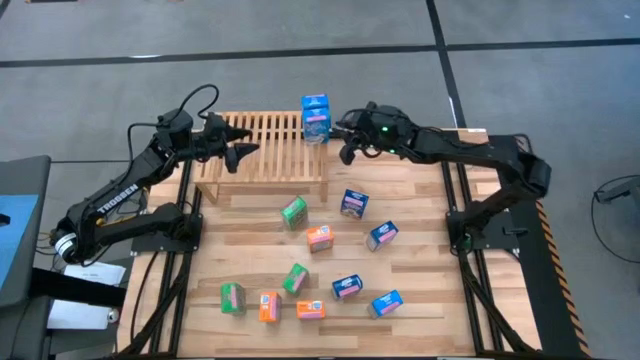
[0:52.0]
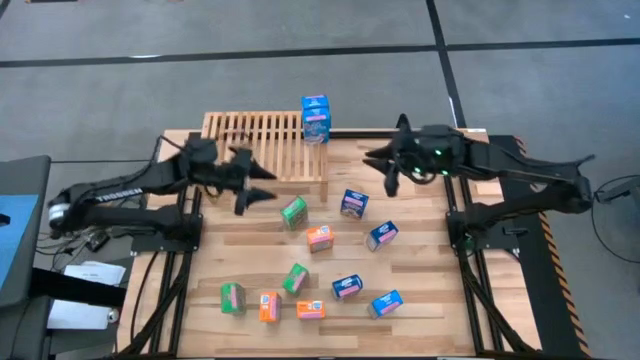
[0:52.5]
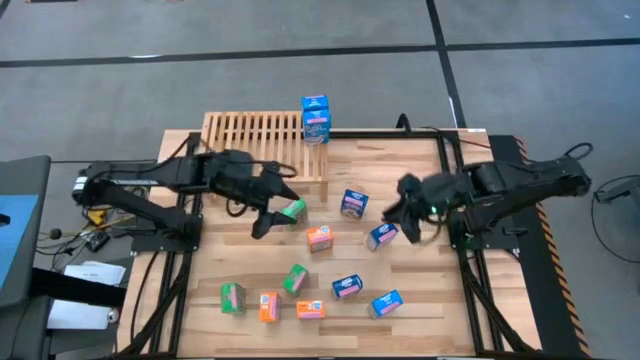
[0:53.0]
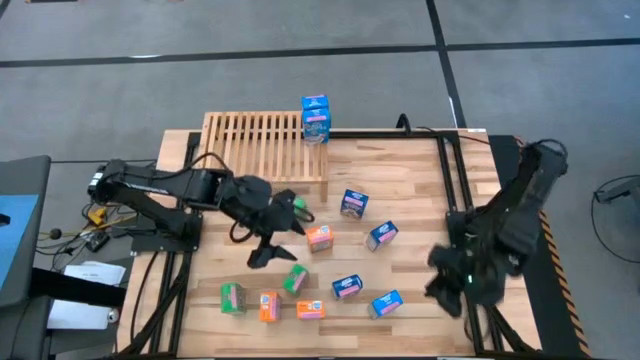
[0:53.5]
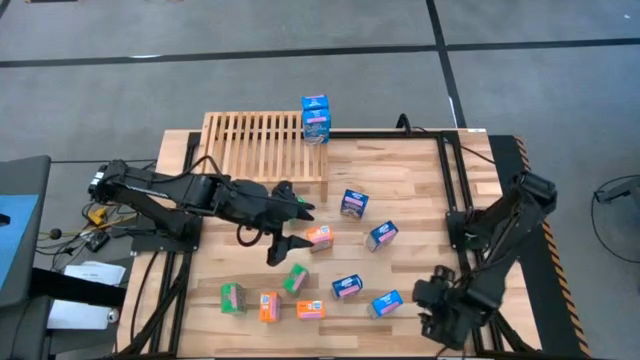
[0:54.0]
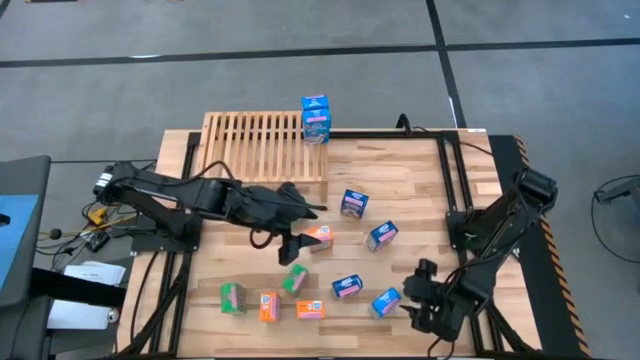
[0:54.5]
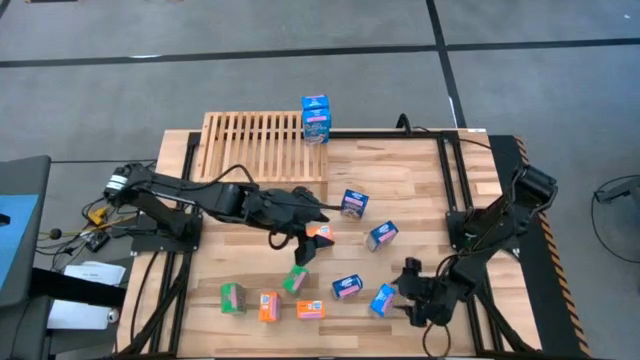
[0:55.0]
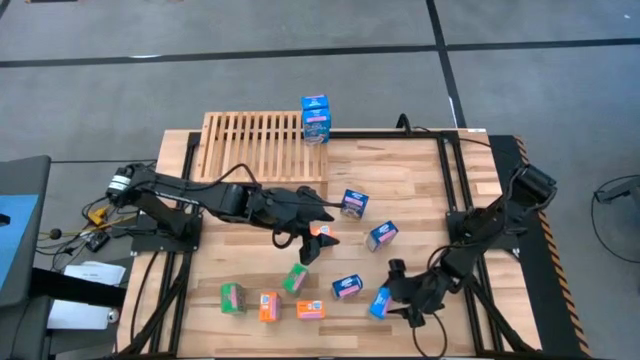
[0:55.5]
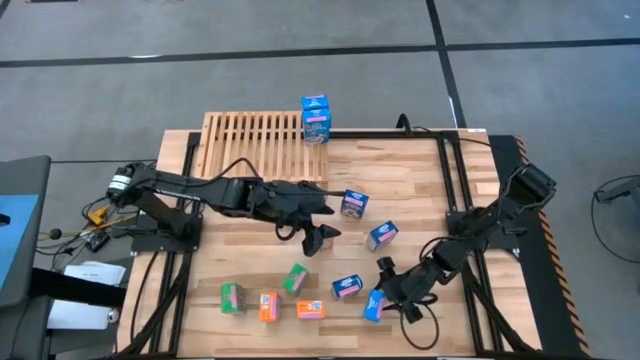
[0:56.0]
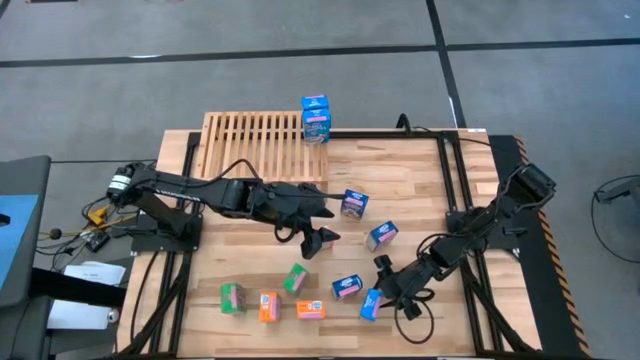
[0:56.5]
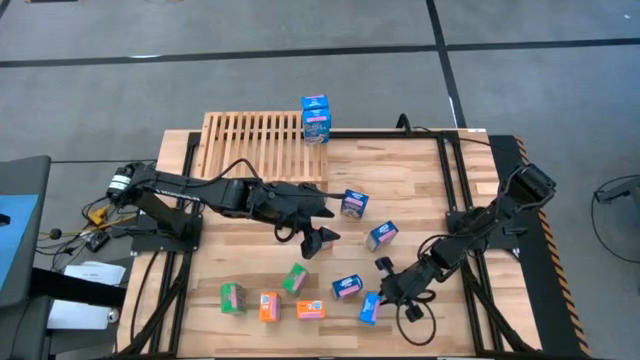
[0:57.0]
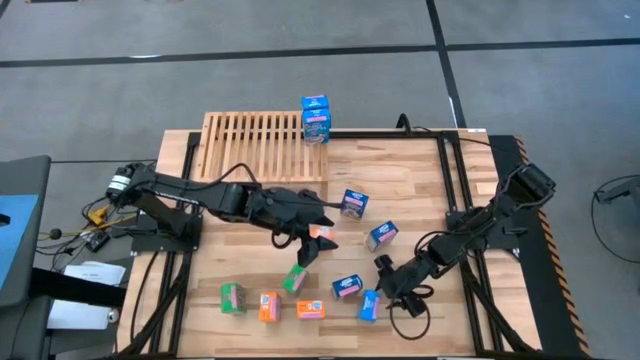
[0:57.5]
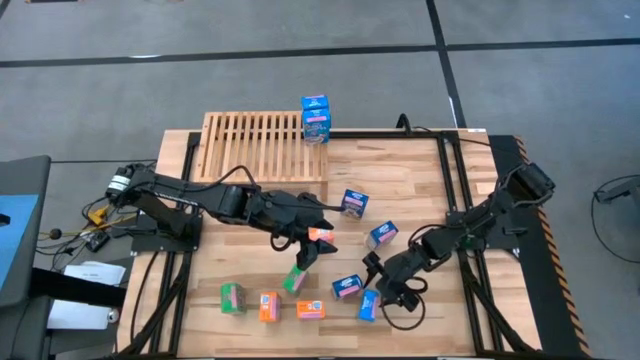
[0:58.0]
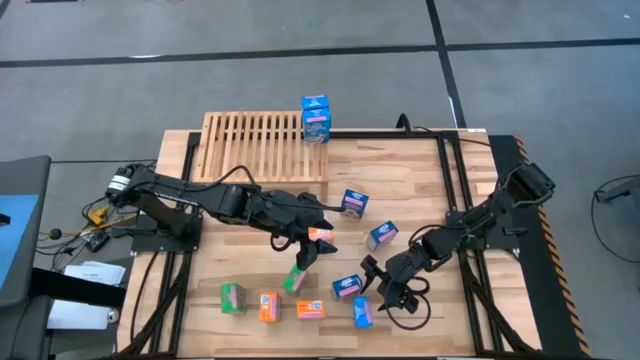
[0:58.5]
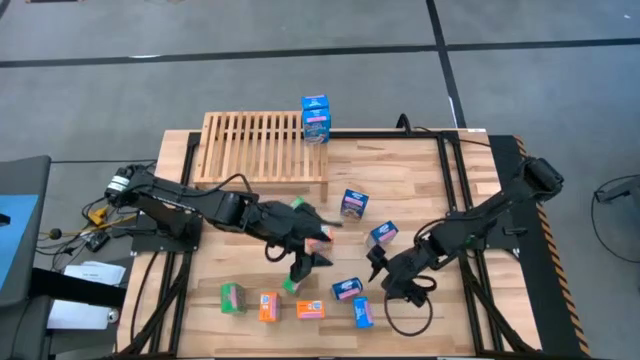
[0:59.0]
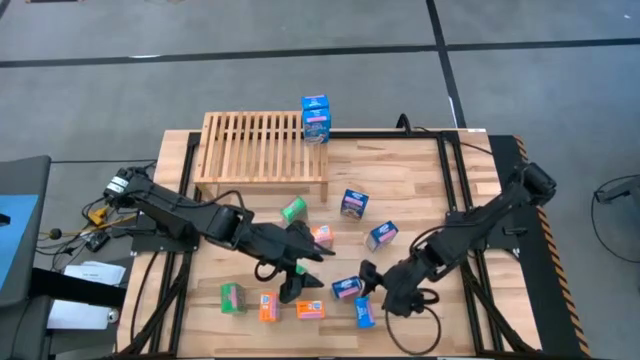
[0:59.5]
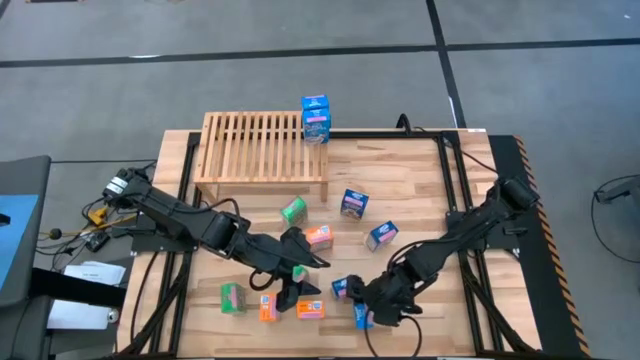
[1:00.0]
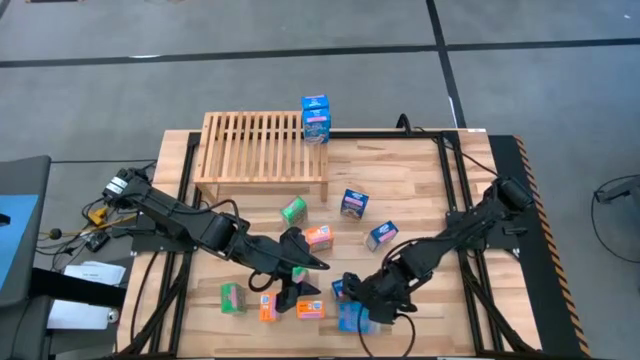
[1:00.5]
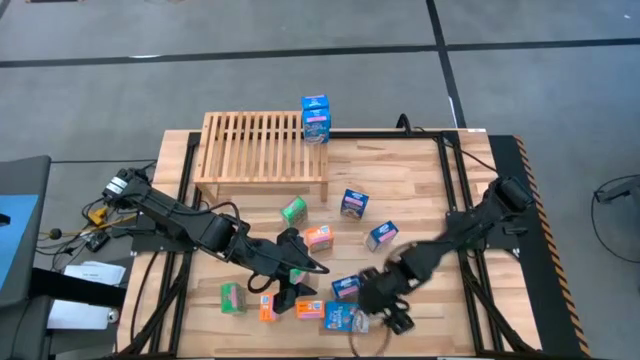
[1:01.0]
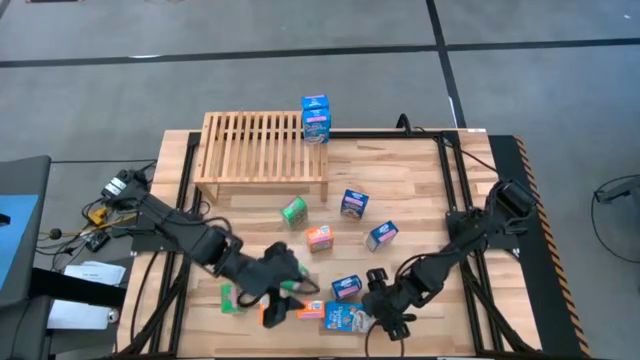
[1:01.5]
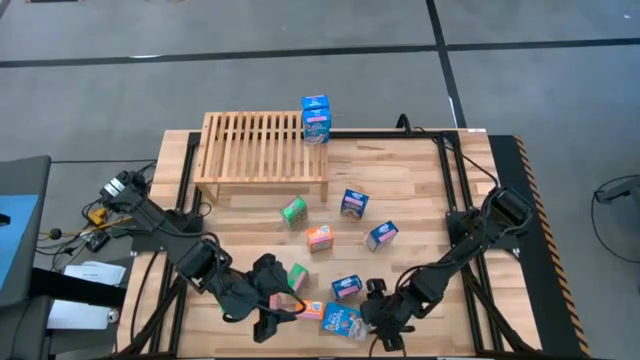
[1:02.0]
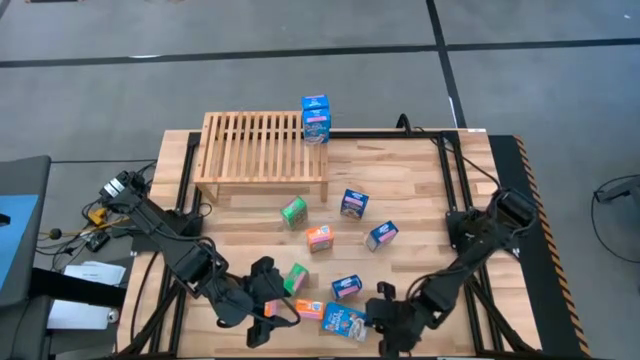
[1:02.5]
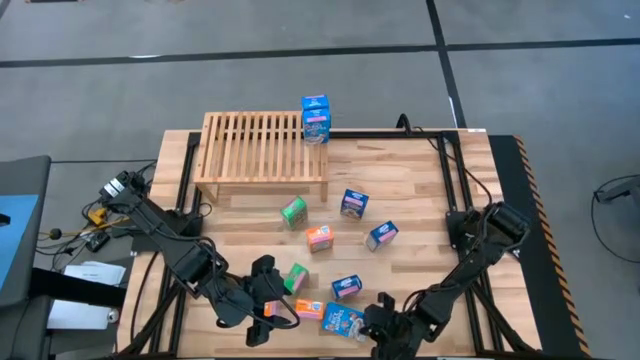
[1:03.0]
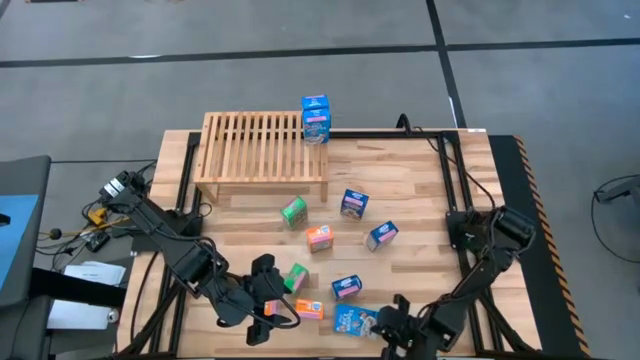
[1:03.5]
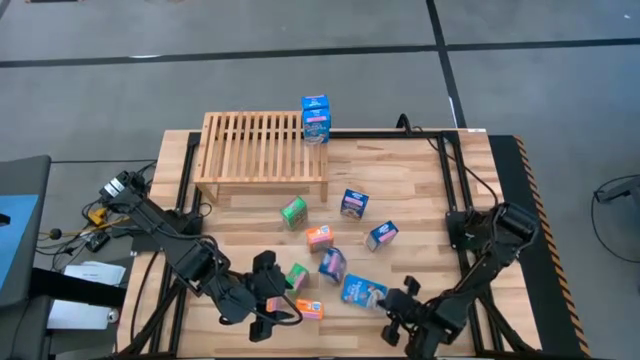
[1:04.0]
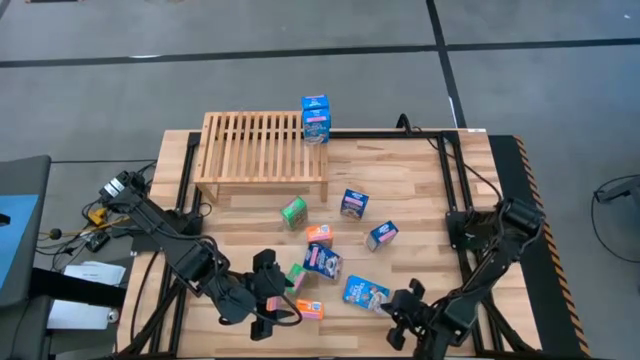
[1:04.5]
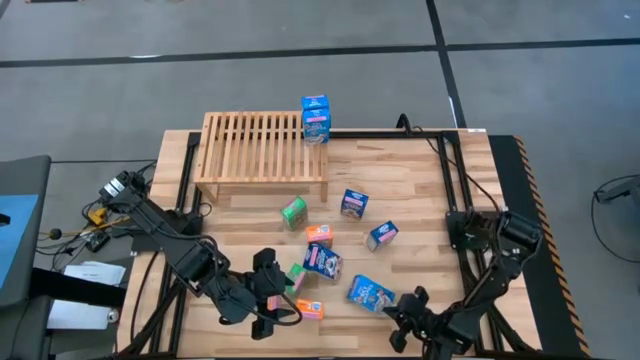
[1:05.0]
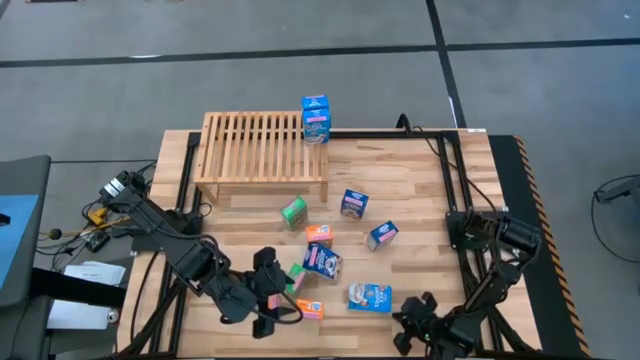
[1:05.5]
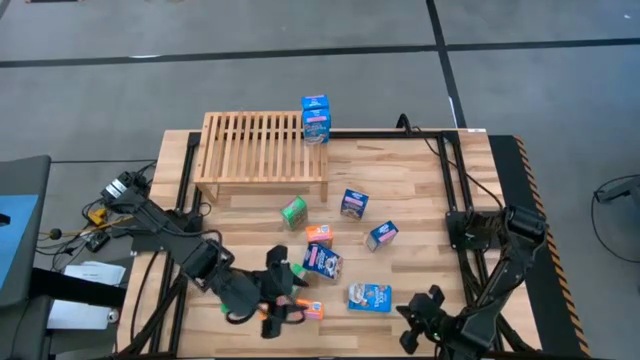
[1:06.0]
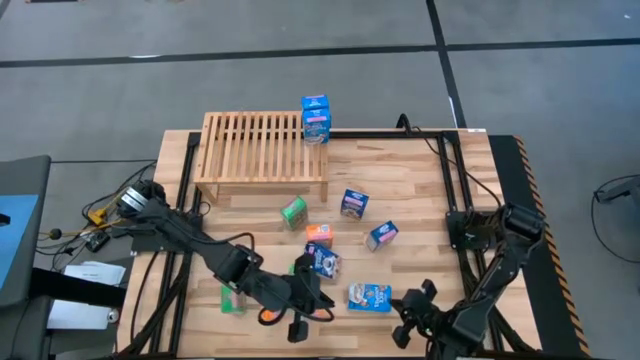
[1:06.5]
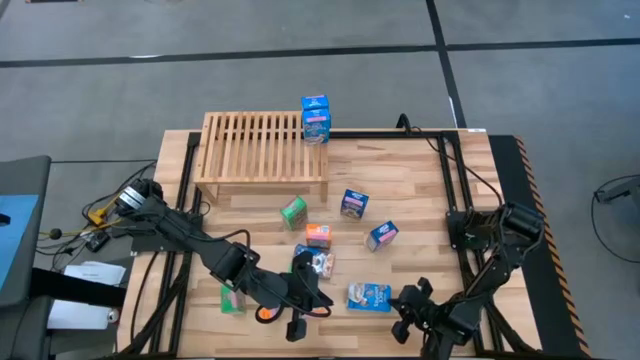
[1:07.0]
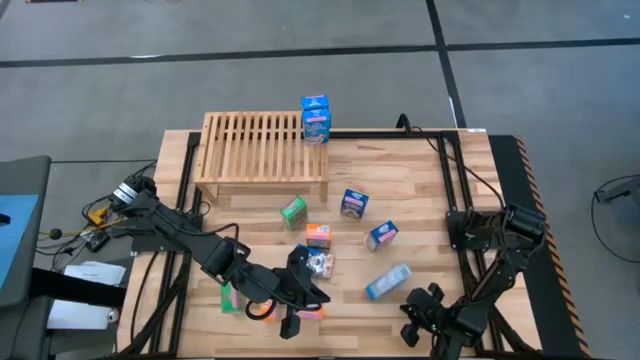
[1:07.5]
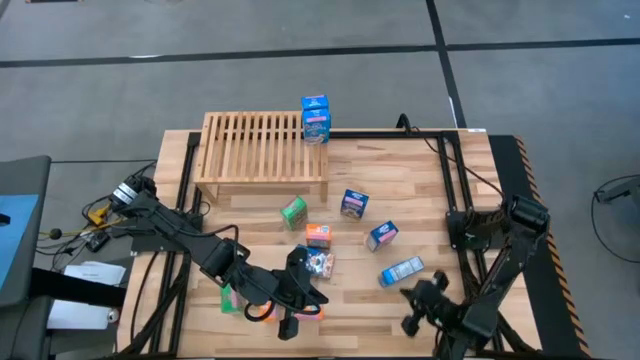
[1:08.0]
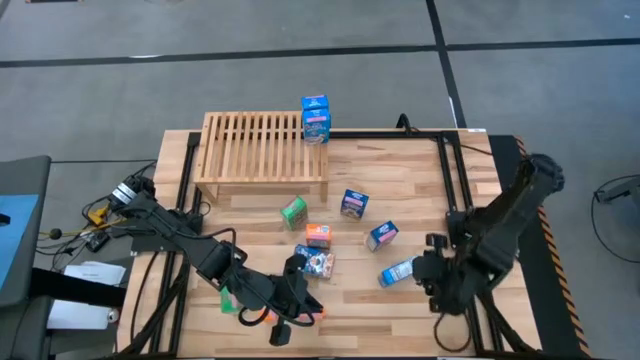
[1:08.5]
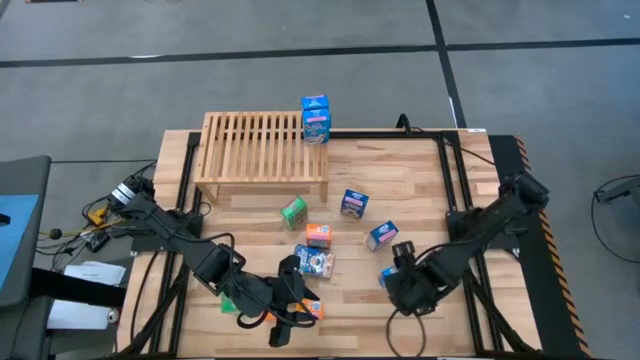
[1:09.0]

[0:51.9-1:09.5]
Task: Stack cereal on shelf
Put the light blue cereal box on the shelf aligned with the other light blue cereal boxes

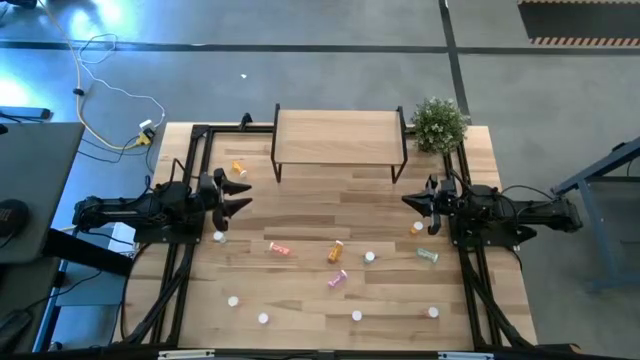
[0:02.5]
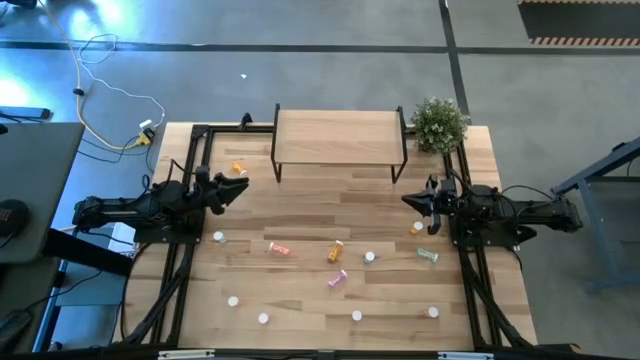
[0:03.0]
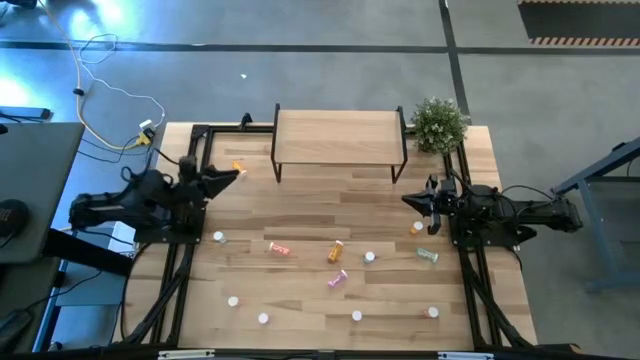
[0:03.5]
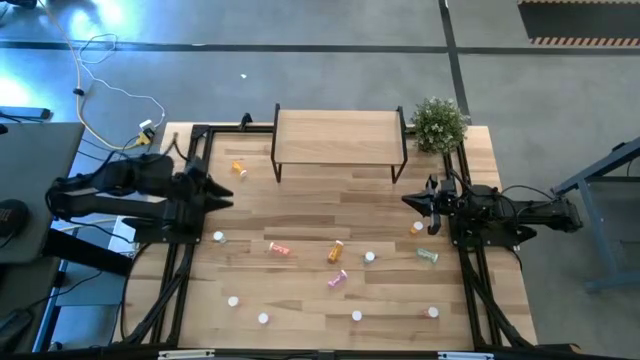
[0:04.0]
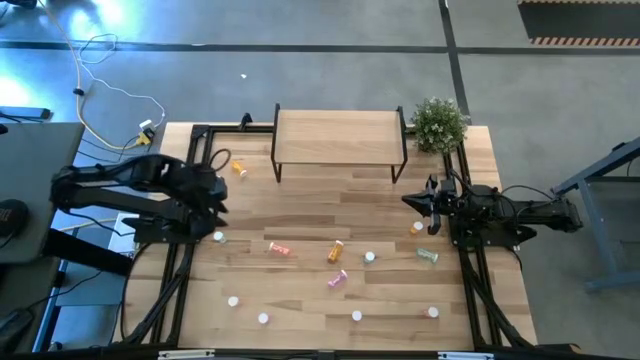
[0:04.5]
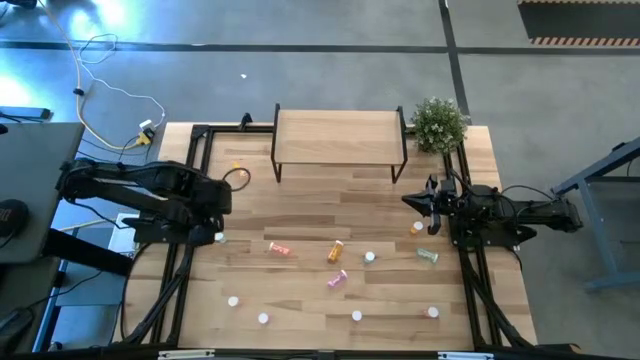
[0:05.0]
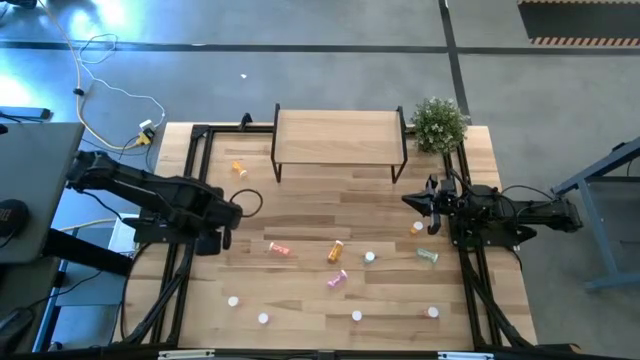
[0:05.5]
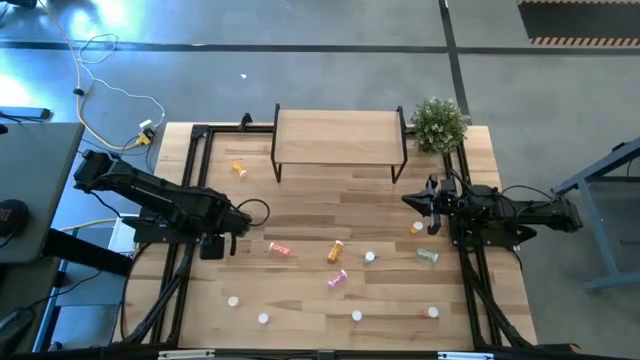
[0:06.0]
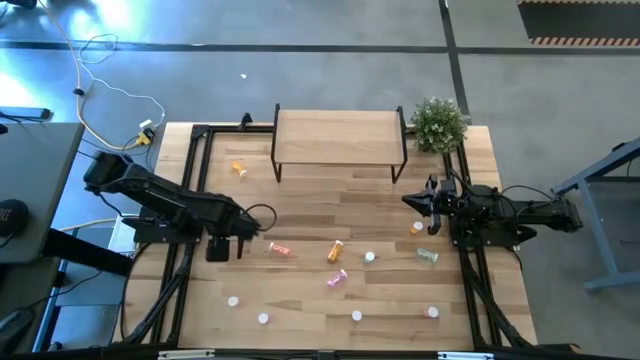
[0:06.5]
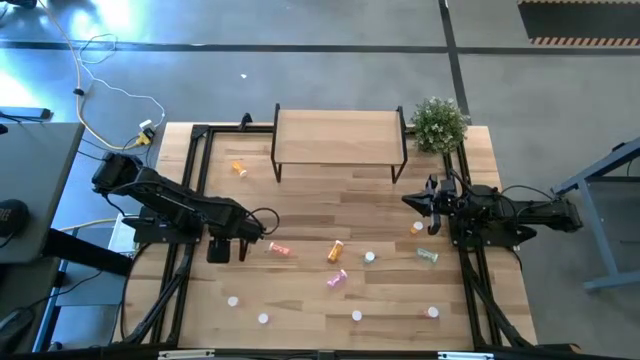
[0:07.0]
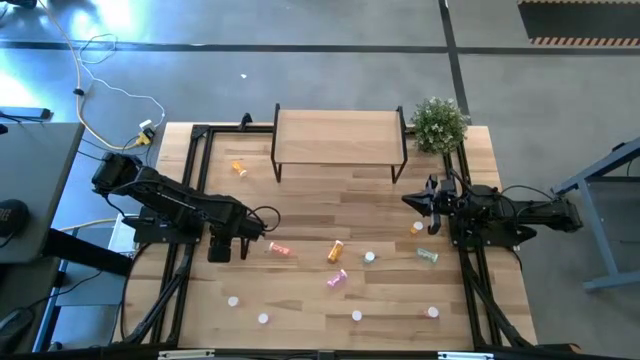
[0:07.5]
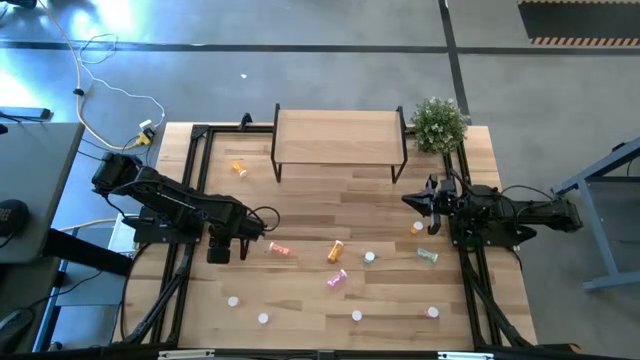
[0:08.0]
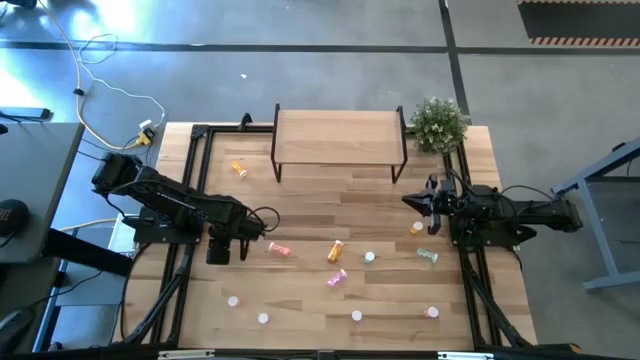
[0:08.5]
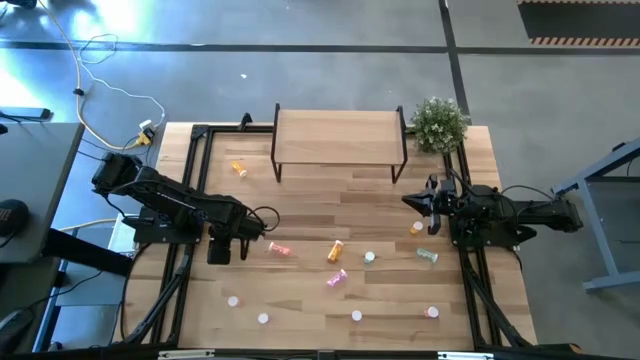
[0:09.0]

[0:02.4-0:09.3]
Task: Pick and place medicine bottles onto shelf by color
Put the left blue pill bottle on the shelf
